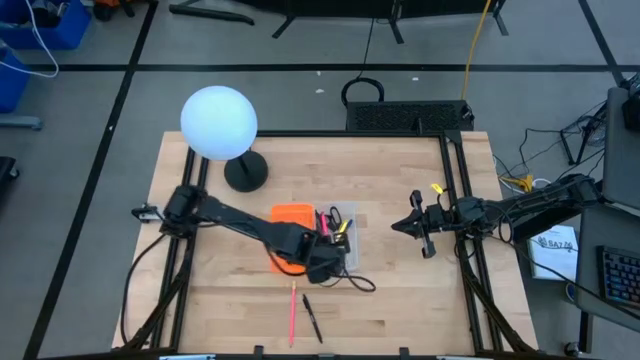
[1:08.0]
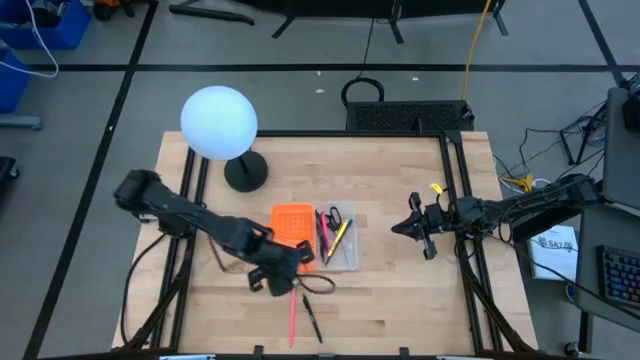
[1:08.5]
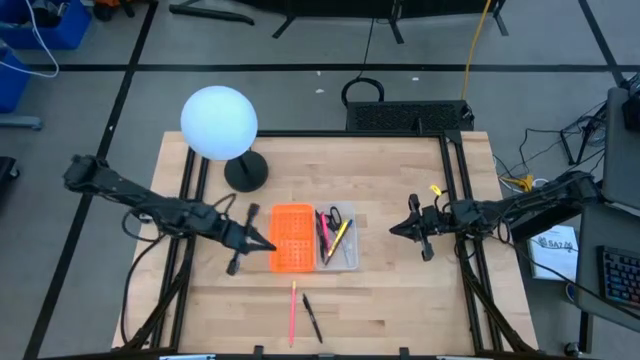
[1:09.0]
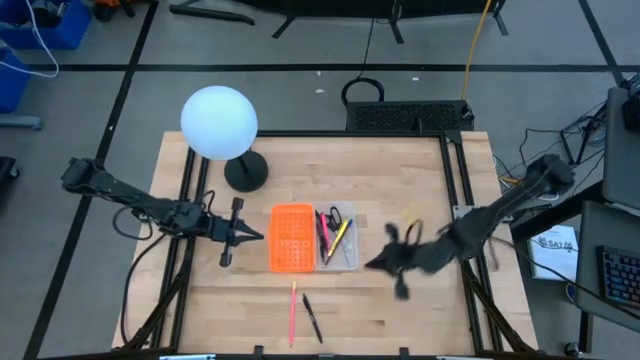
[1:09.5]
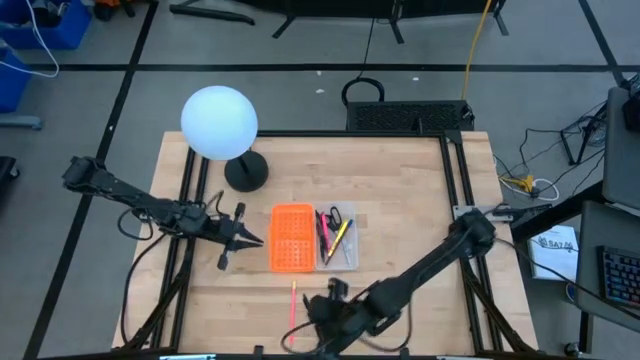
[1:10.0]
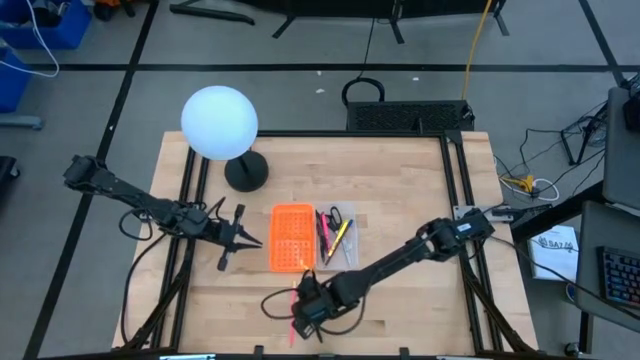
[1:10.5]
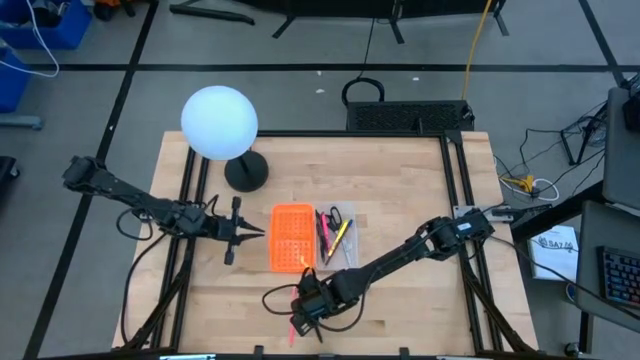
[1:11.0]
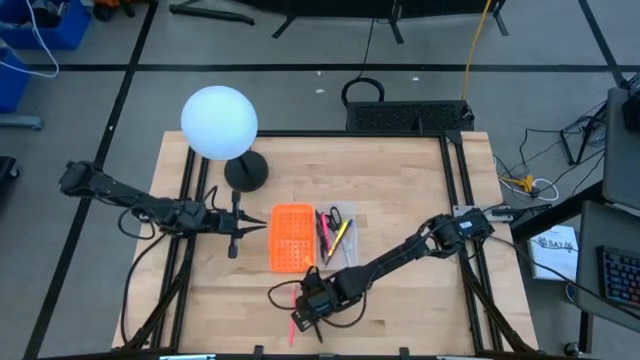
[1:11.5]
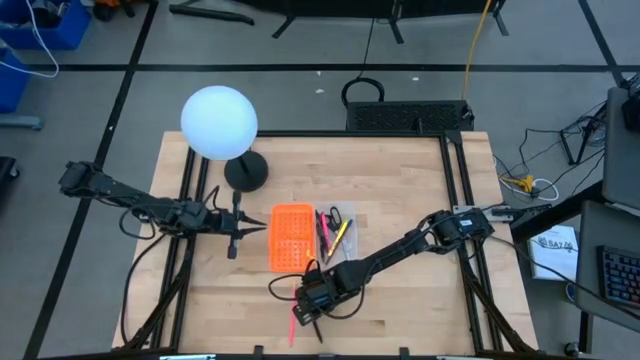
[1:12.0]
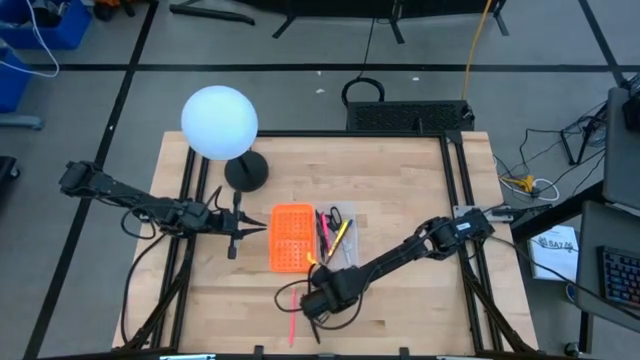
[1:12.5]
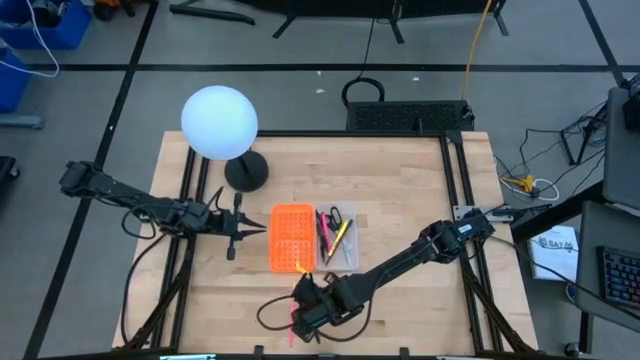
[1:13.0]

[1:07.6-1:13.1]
Task: Pick & place school supplies into a supply box
Put the black pen into the orange and white supply box

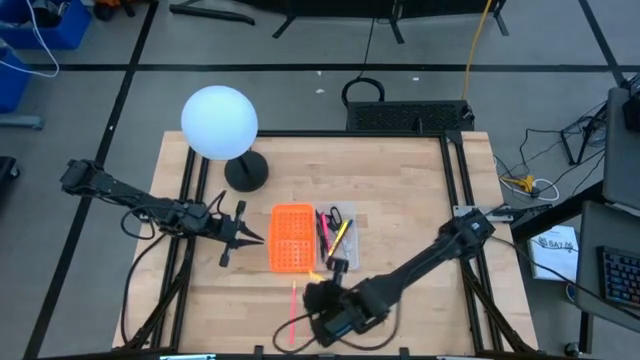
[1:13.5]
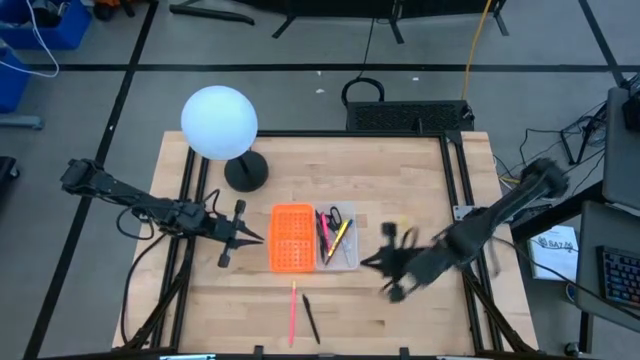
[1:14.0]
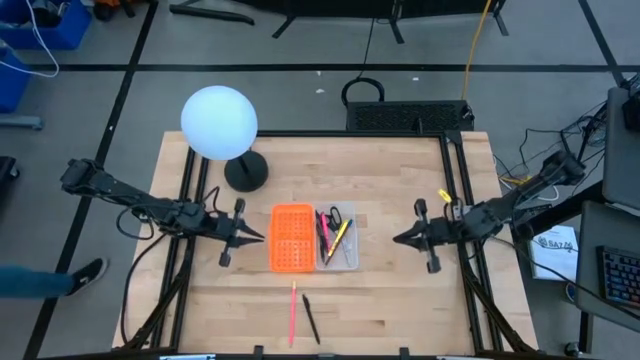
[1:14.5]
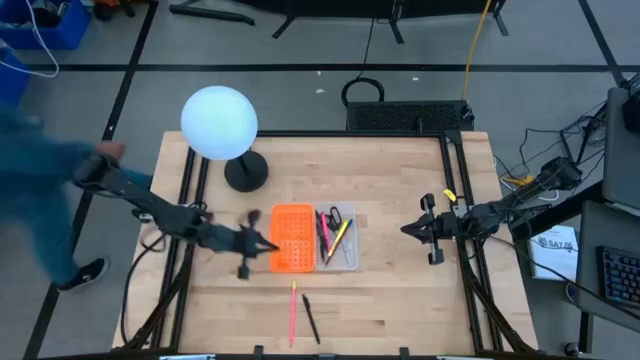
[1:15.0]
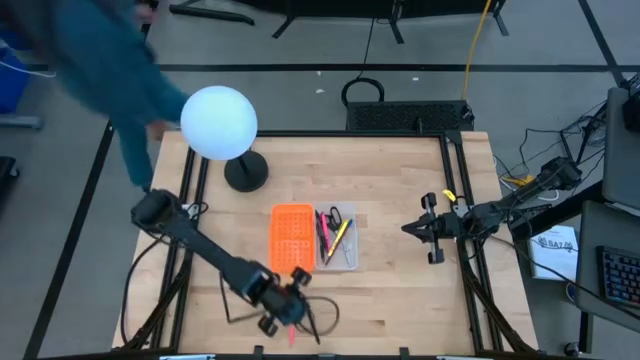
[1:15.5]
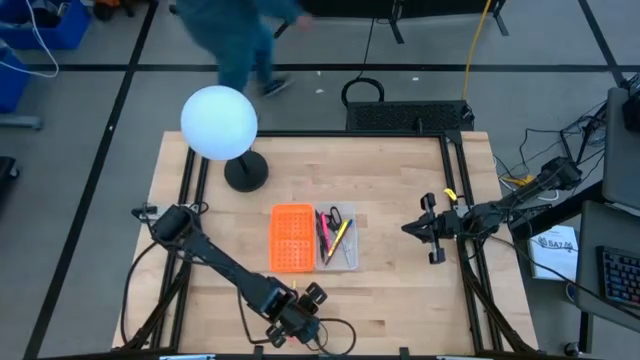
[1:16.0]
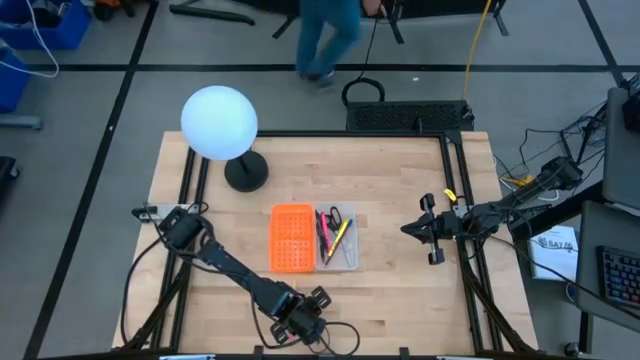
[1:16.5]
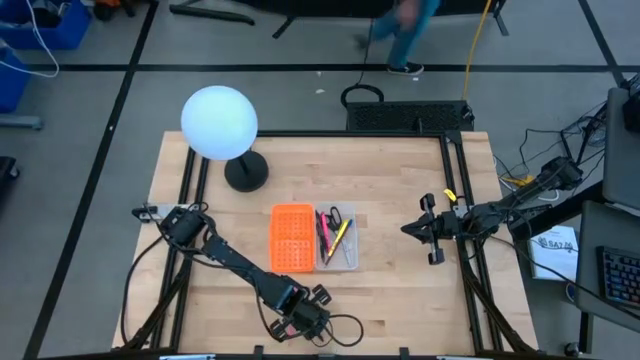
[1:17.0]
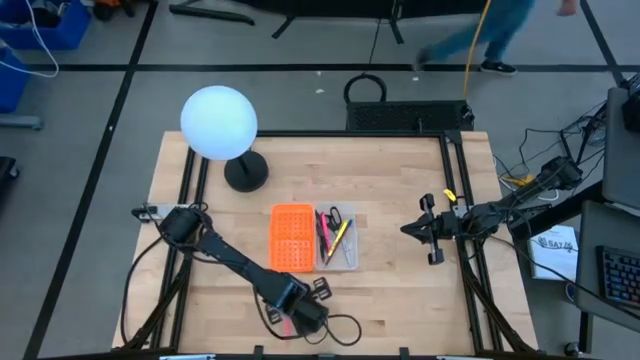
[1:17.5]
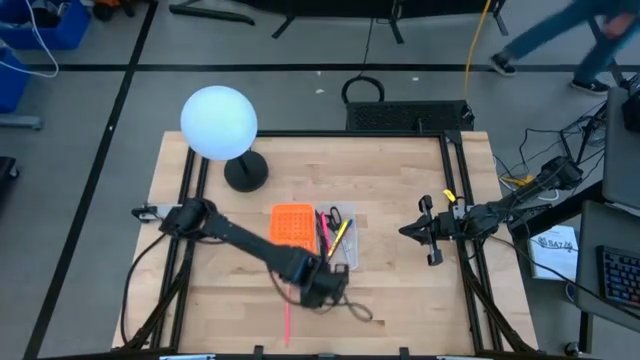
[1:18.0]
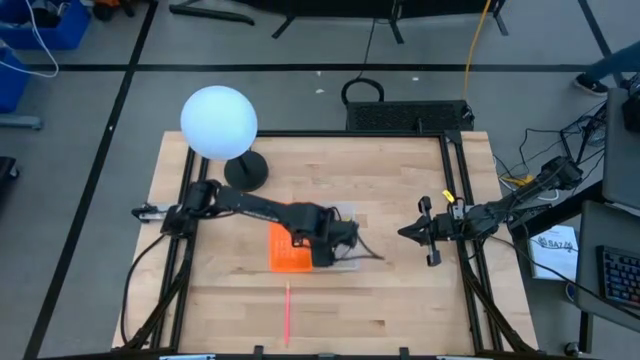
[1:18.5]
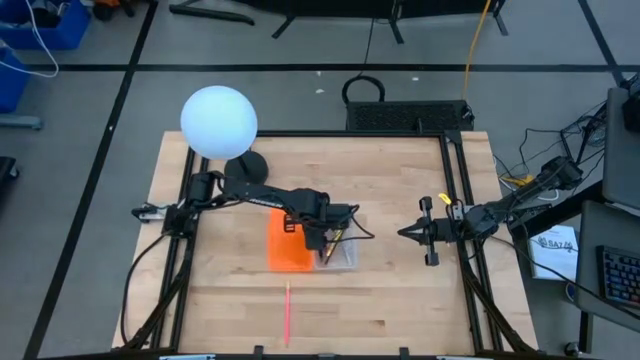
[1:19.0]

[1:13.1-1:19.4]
Put the black pen into the orange and white supply box

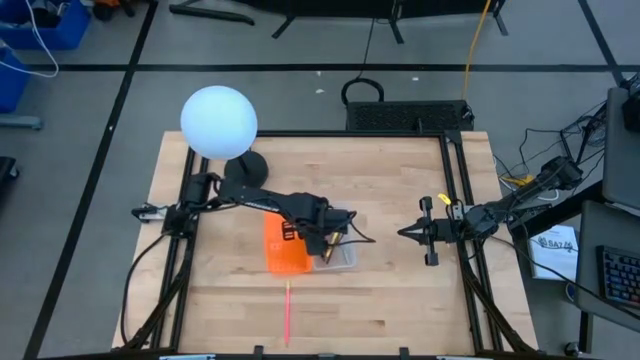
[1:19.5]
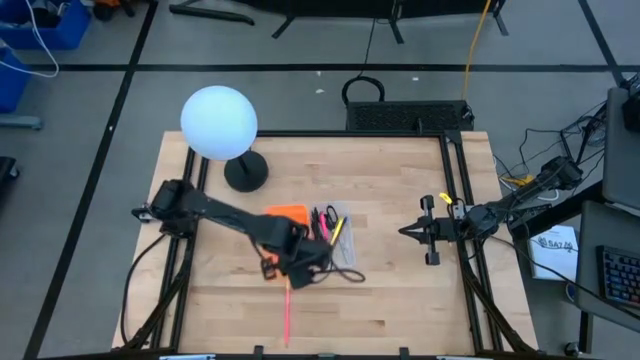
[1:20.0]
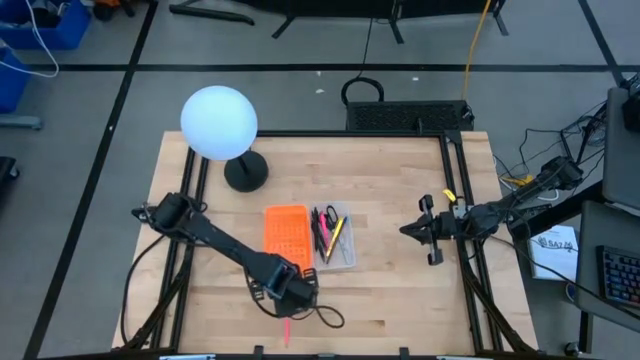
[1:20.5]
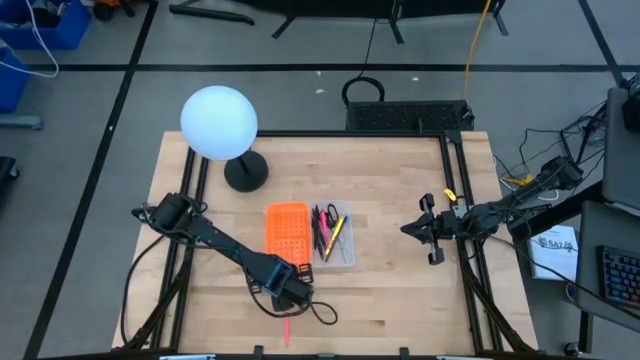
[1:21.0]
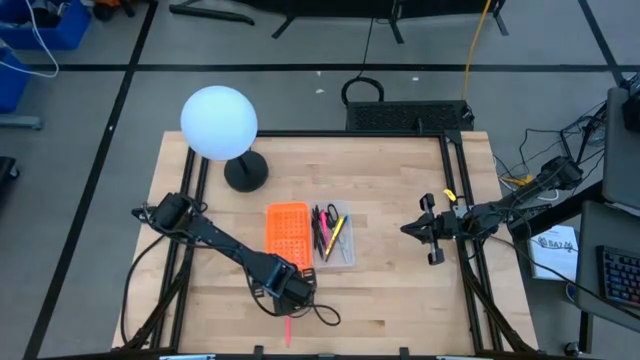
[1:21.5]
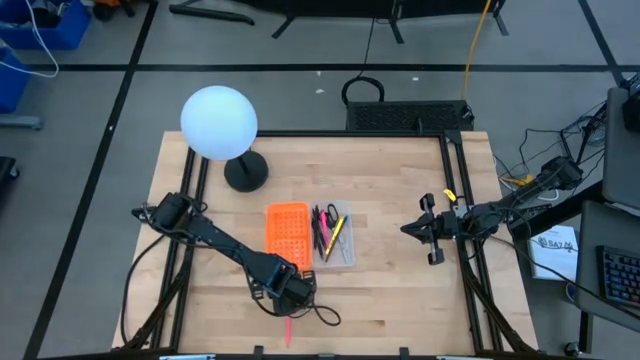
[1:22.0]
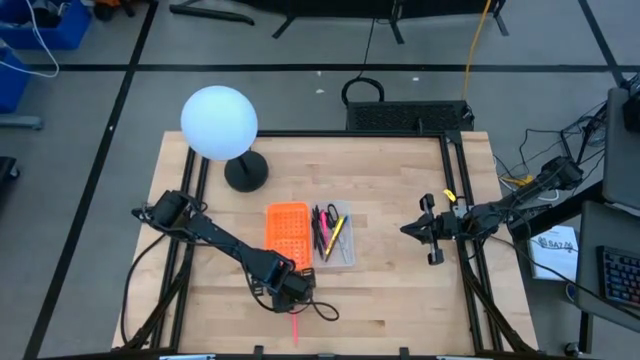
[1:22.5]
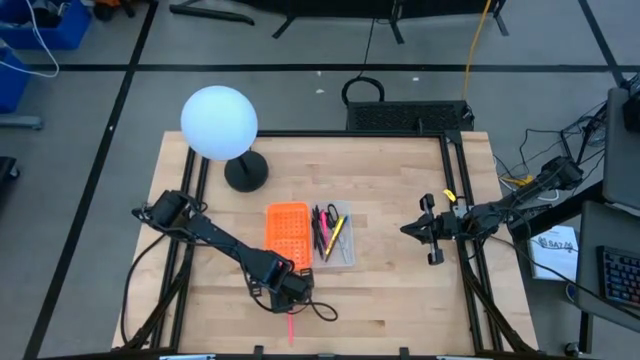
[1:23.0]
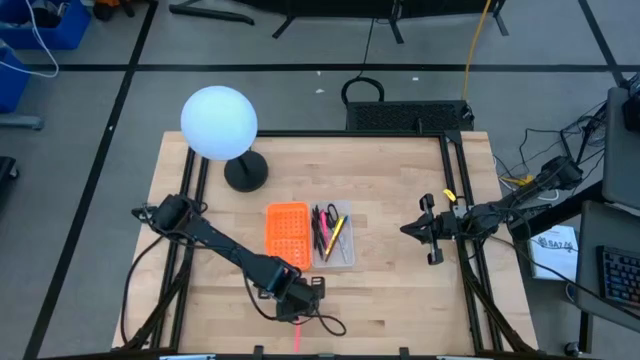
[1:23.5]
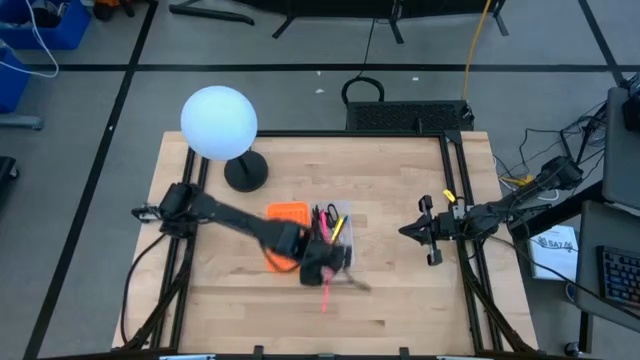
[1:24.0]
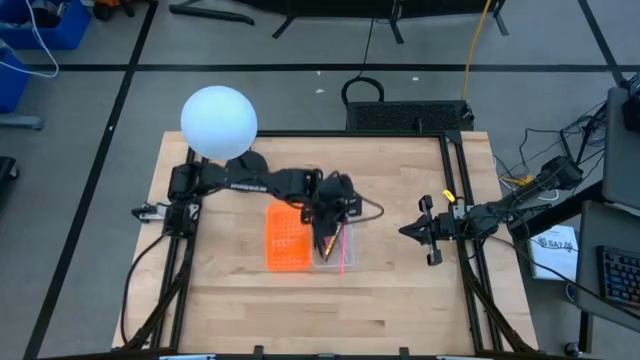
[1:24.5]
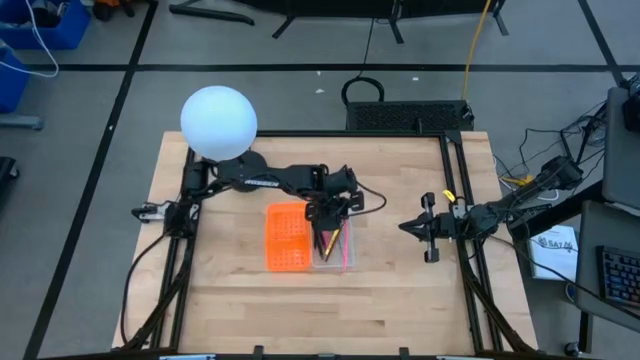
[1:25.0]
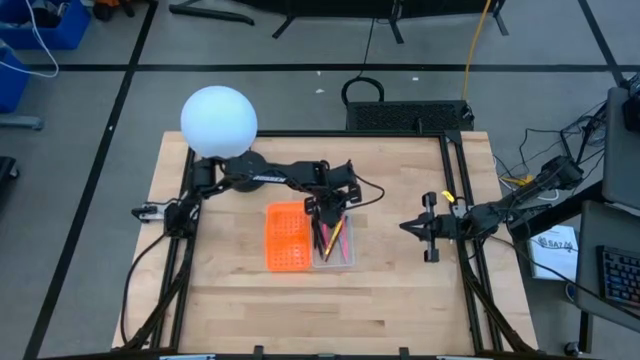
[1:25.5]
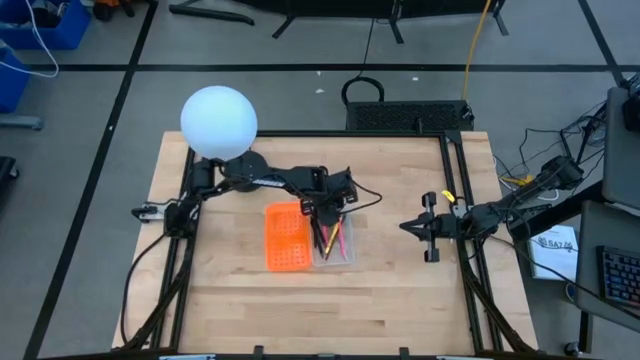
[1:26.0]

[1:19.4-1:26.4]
Put the pink pencil into the orange and white supply box
